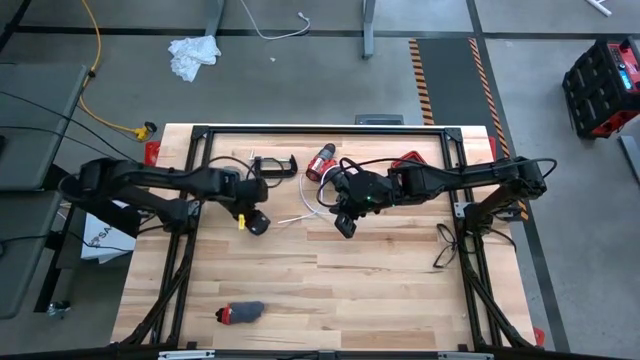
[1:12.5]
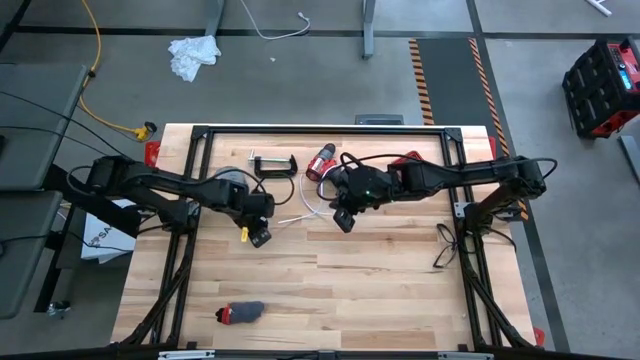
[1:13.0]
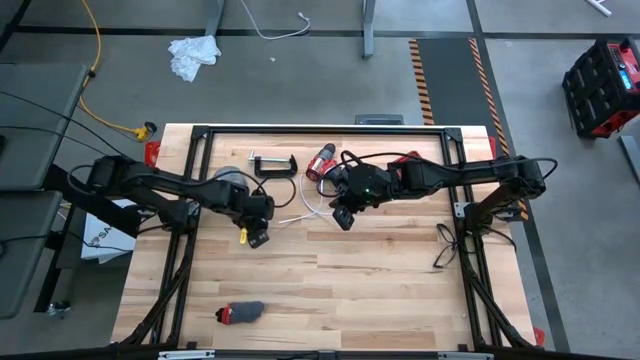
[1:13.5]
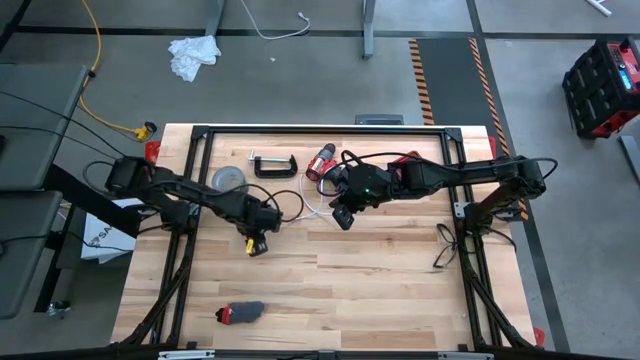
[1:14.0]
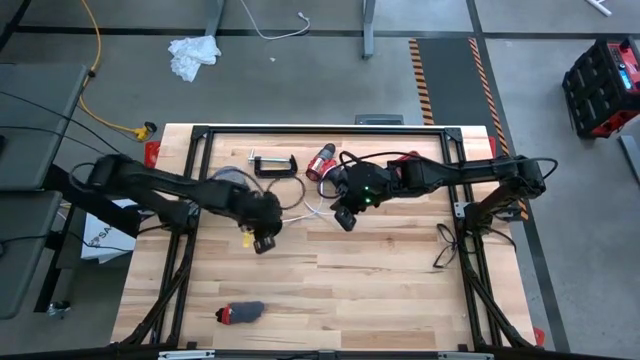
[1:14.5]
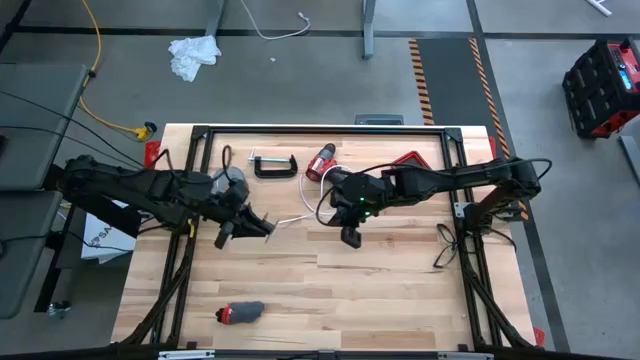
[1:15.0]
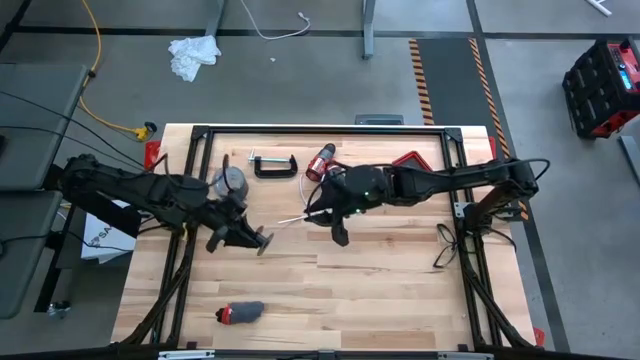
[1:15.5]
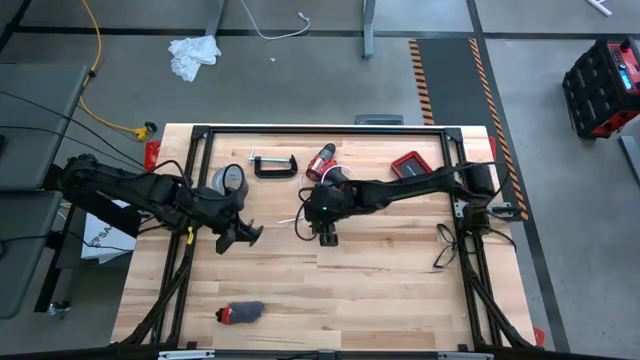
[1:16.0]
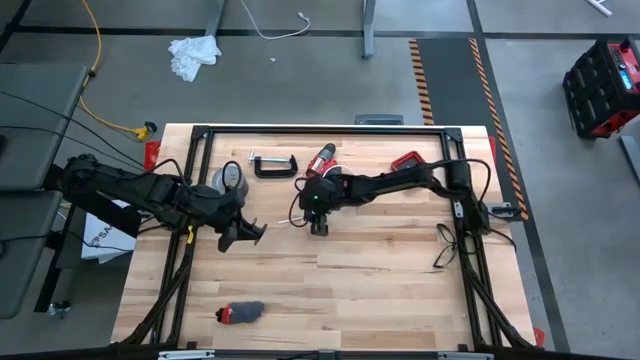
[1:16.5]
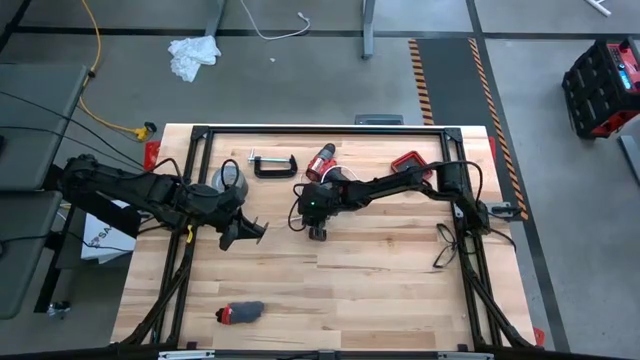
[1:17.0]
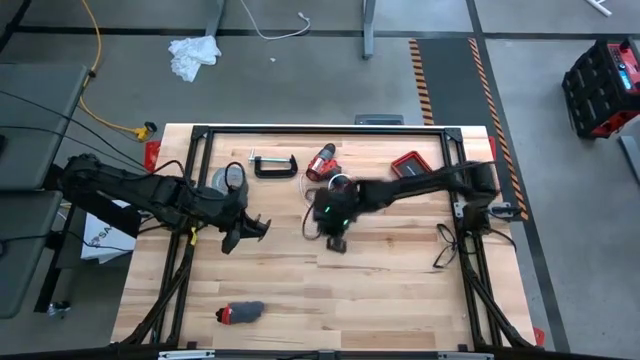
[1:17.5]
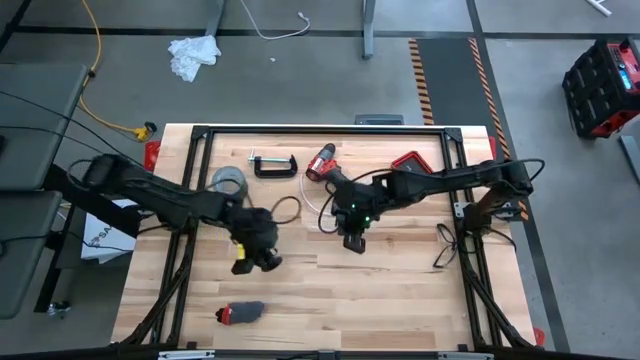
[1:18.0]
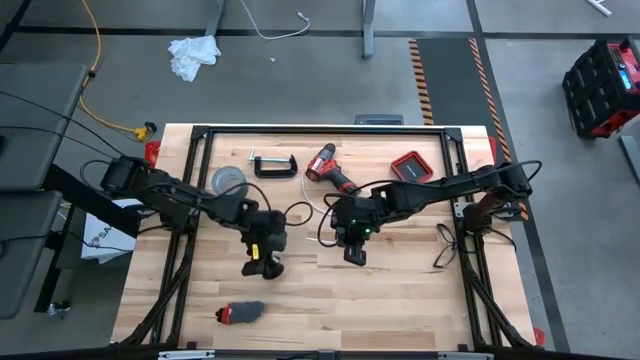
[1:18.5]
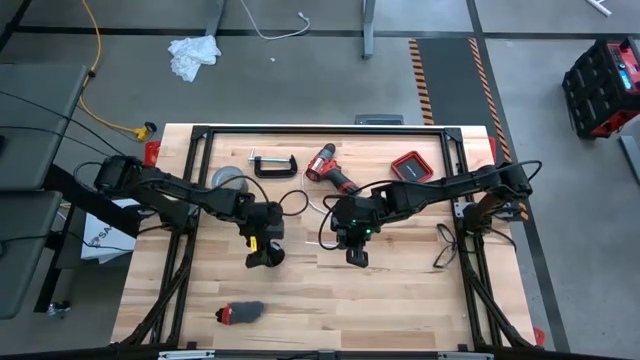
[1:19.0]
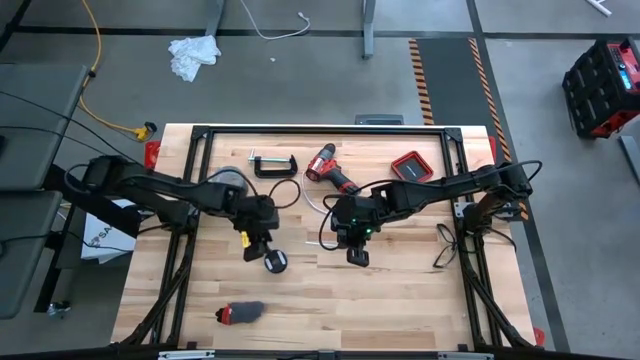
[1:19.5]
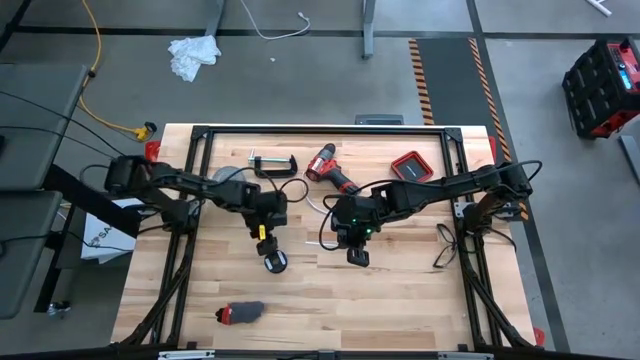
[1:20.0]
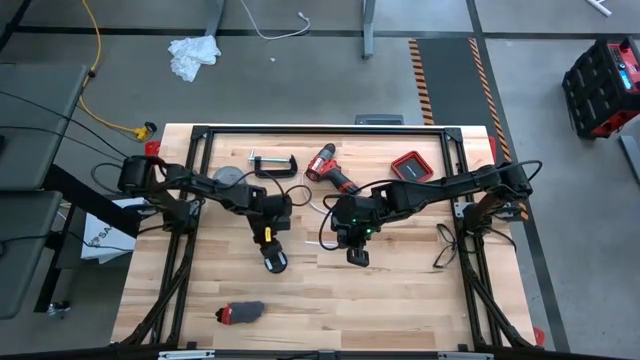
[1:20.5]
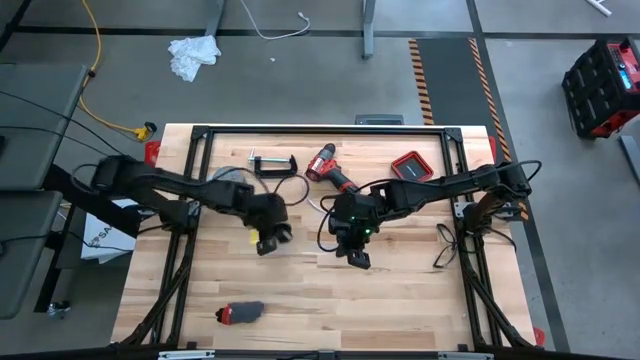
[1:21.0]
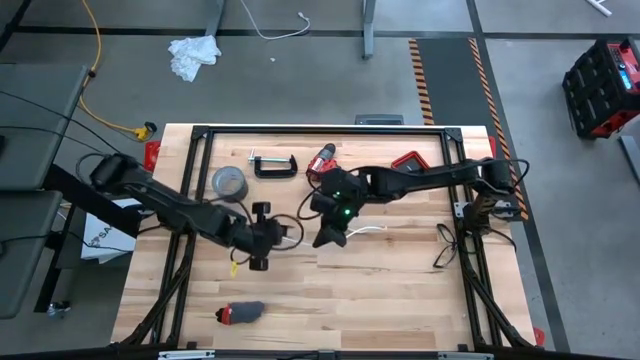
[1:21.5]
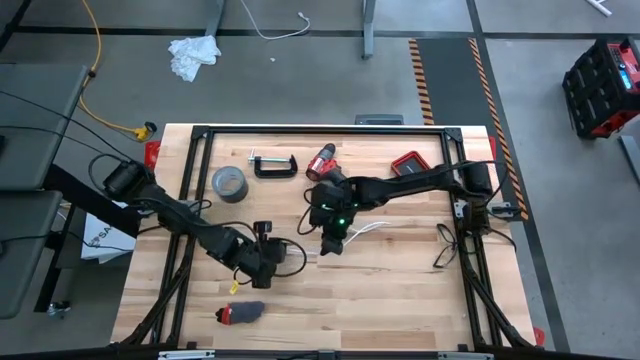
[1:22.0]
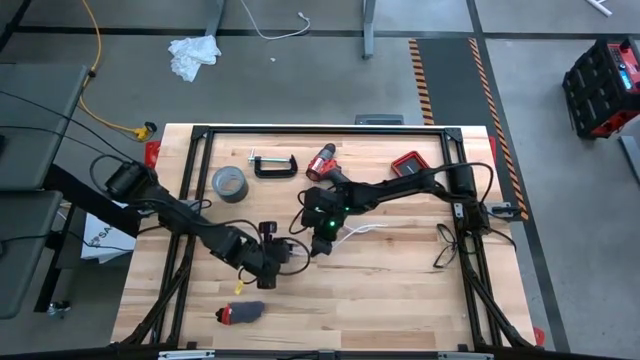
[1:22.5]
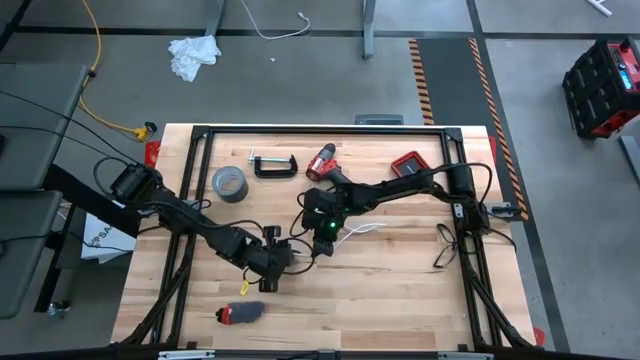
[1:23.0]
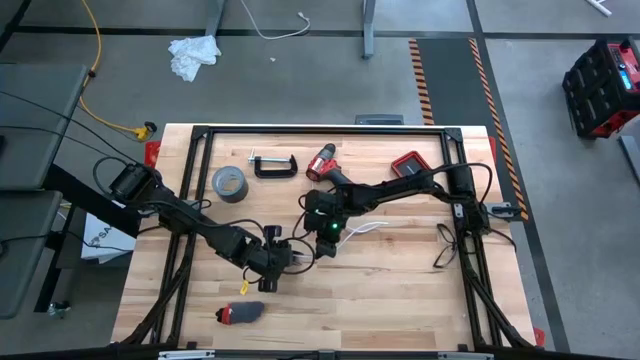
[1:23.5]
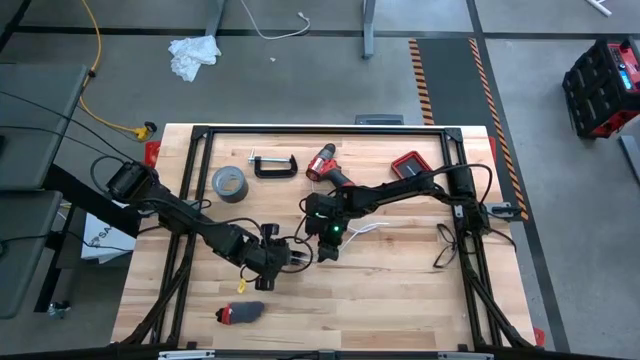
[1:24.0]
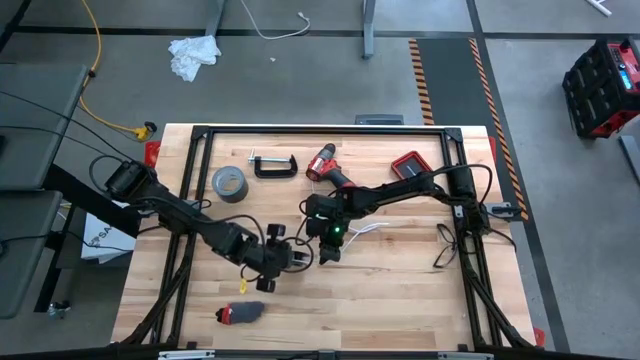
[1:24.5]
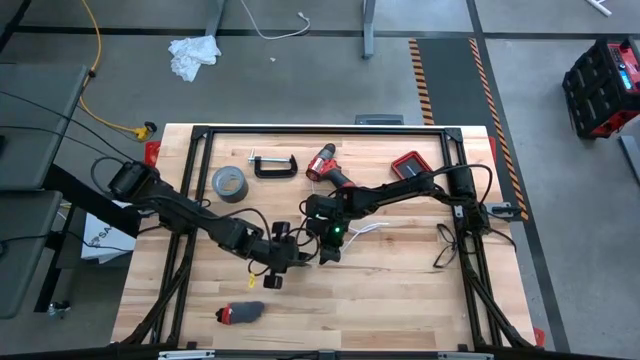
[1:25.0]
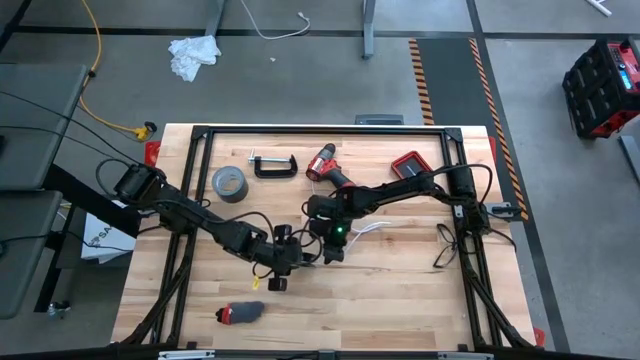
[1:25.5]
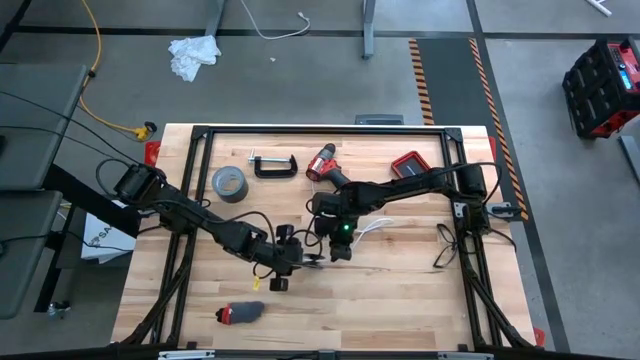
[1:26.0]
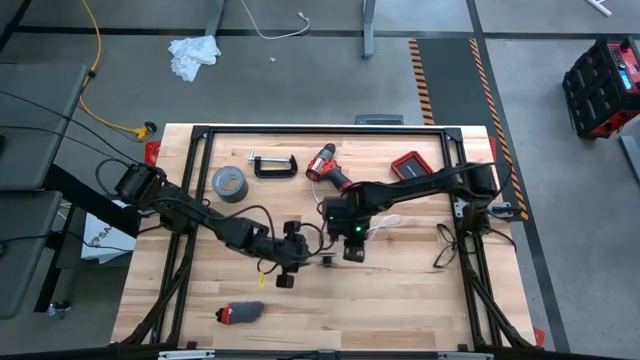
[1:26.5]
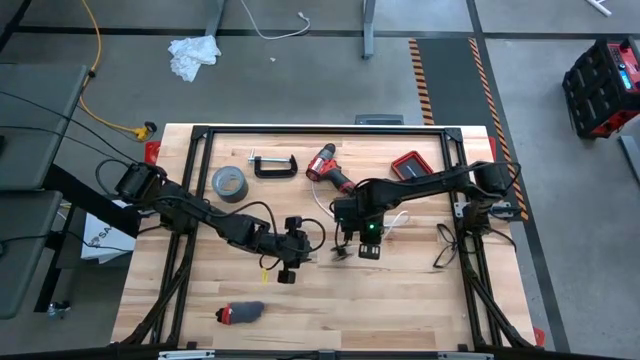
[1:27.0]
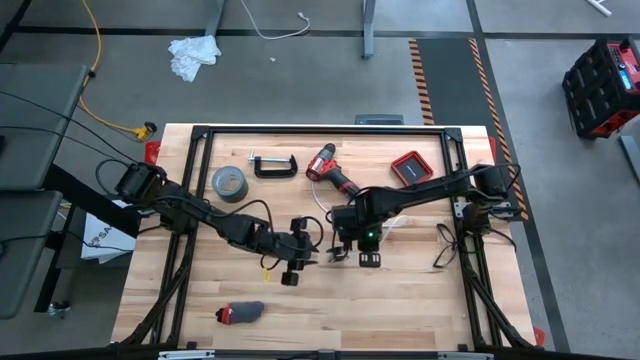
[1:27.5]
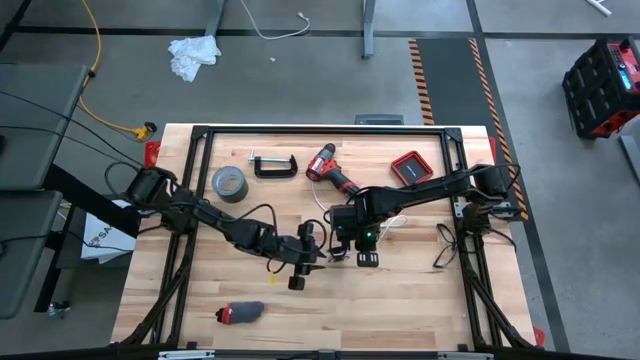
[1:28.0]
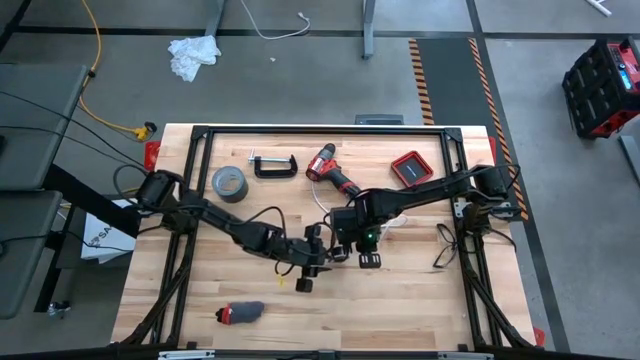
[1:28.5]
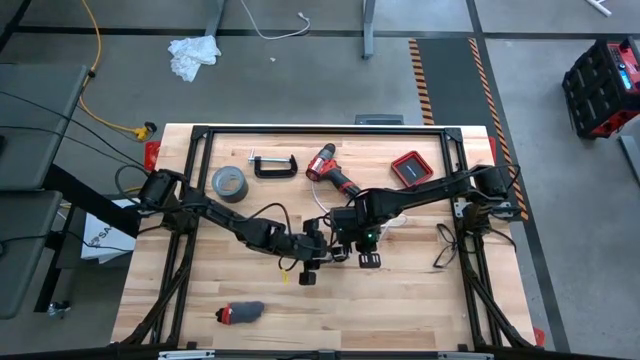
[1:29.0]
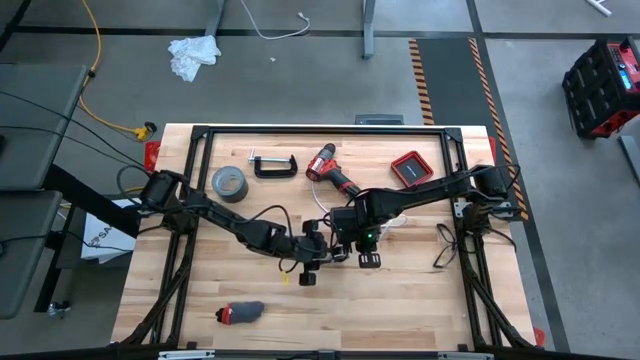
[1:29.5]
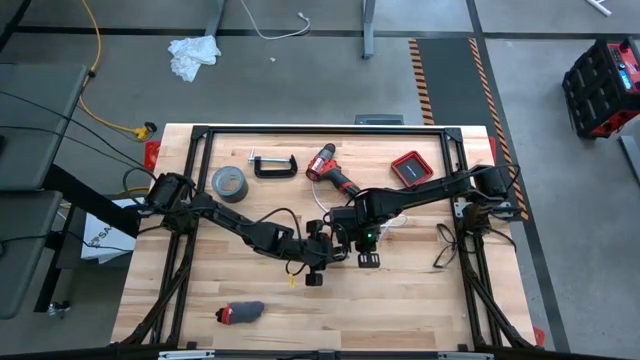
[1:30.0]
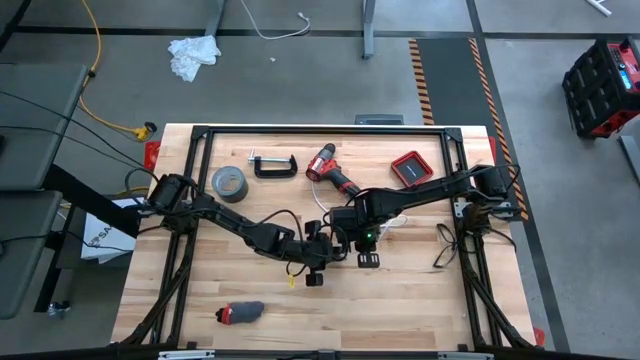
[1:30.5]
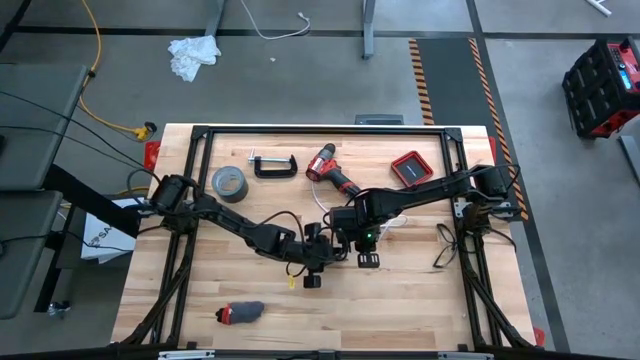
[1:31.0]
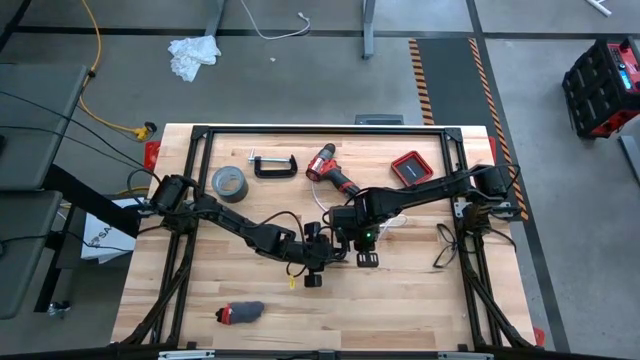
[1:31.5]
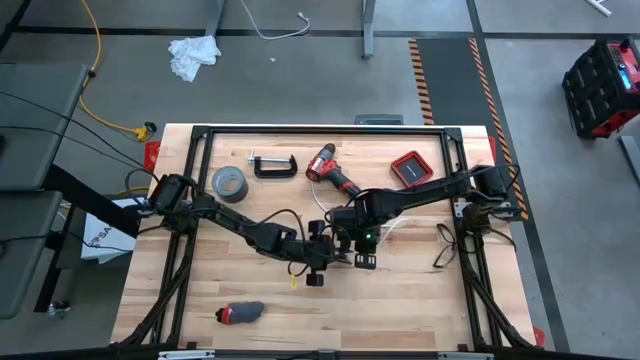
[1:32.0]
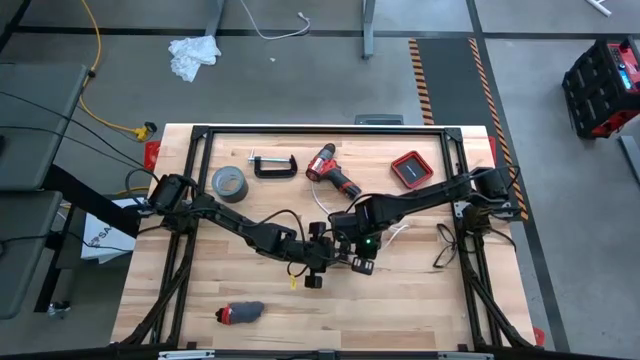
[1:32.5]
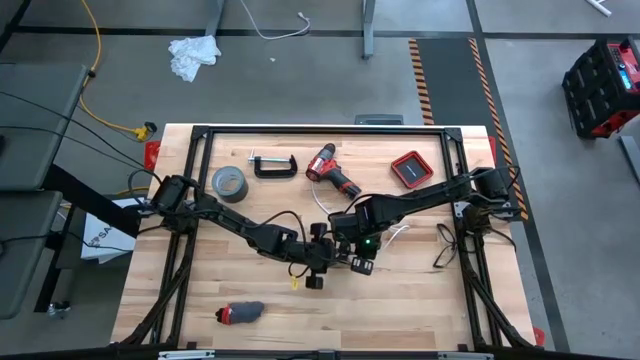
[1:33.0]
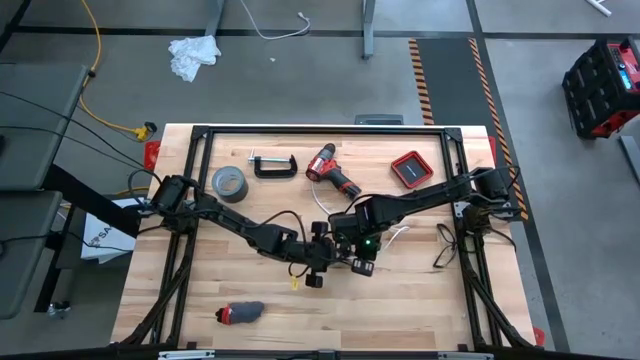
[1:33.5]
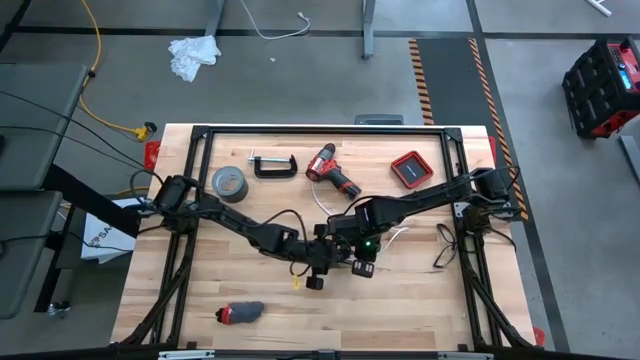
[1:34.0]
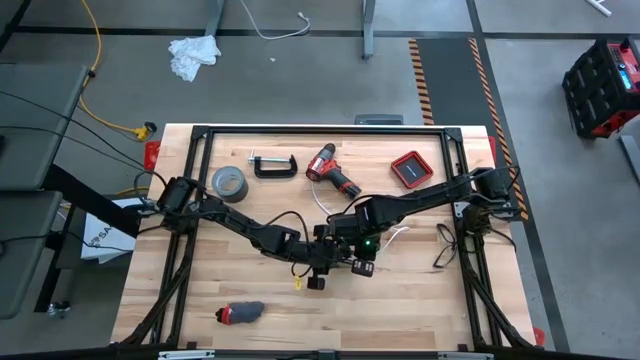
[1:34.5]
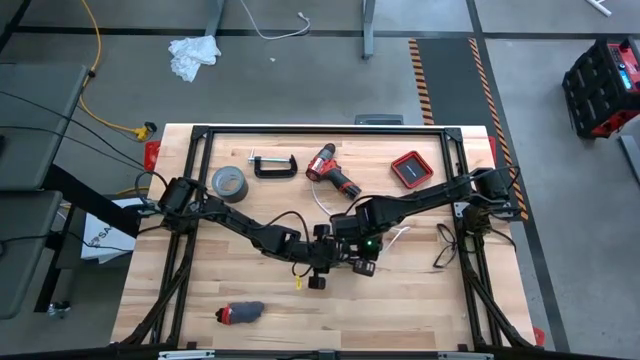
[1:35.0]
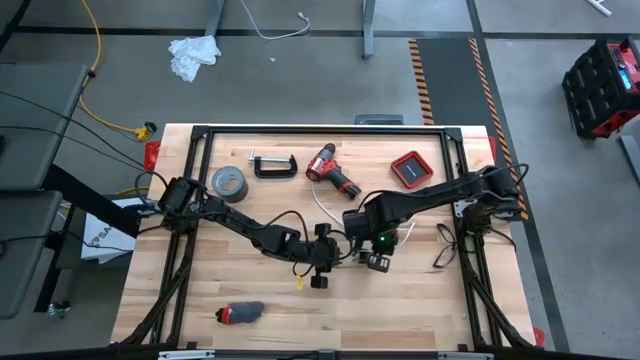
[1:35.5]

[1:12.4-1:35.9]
Task: Coil cords
Coil the white cable wire into the black spool
